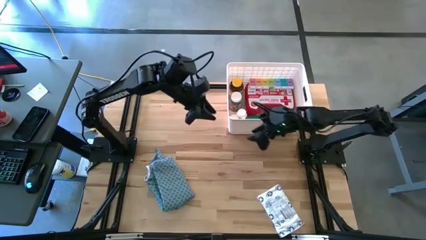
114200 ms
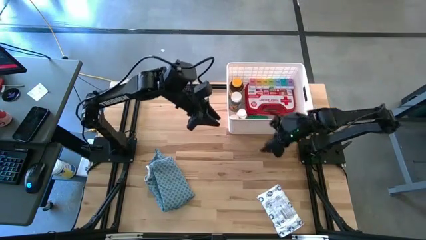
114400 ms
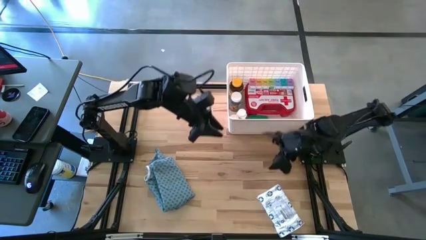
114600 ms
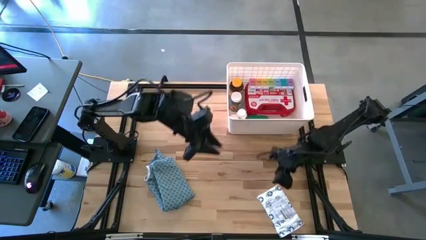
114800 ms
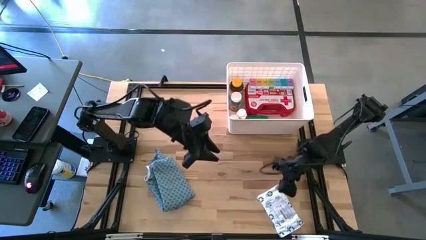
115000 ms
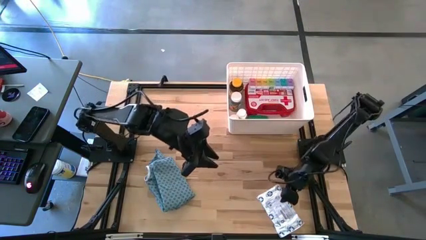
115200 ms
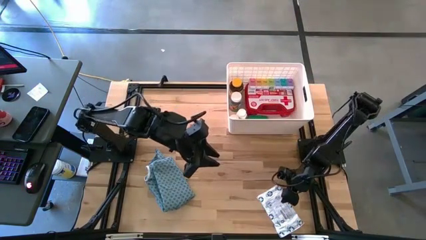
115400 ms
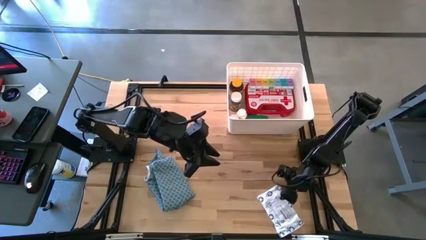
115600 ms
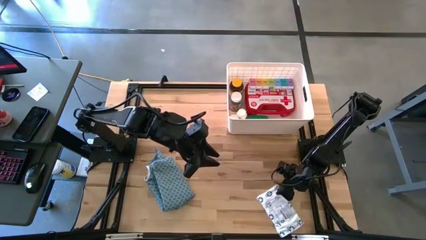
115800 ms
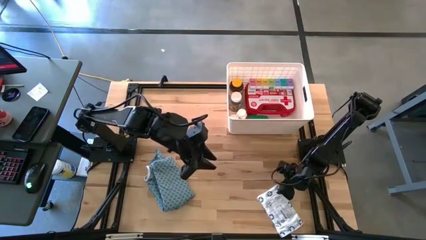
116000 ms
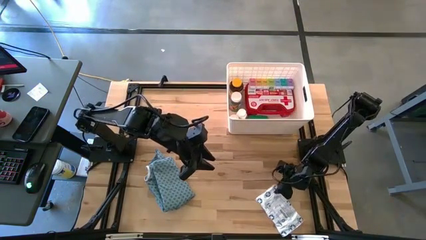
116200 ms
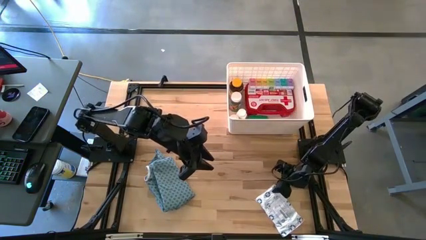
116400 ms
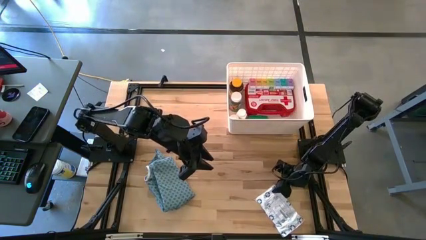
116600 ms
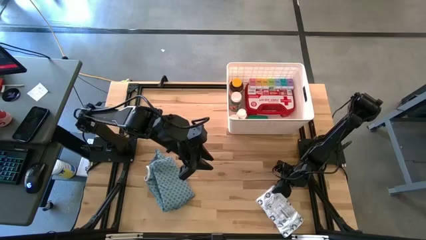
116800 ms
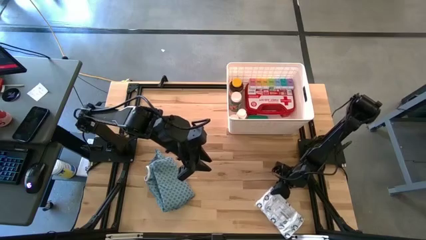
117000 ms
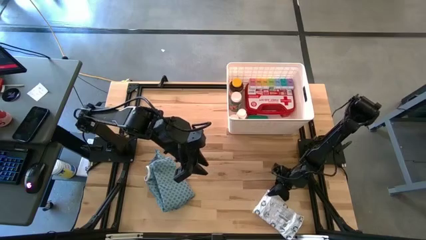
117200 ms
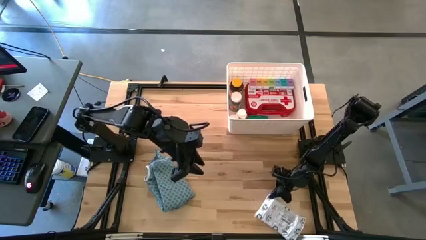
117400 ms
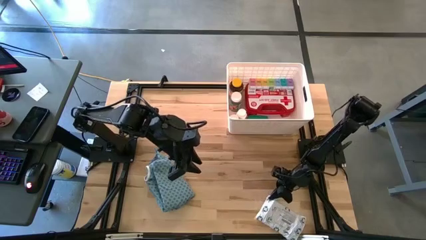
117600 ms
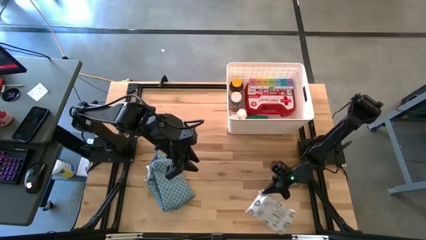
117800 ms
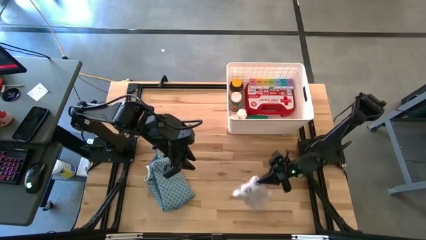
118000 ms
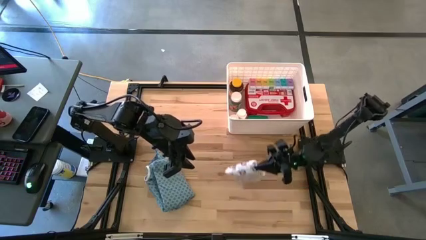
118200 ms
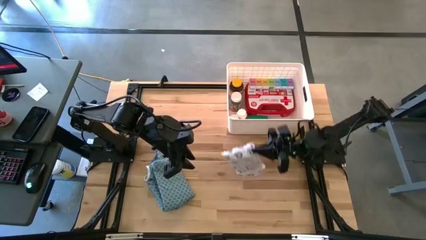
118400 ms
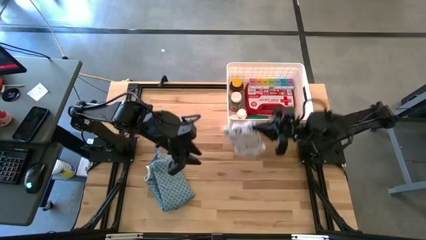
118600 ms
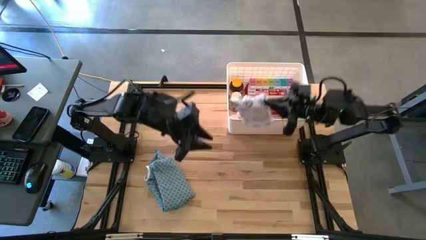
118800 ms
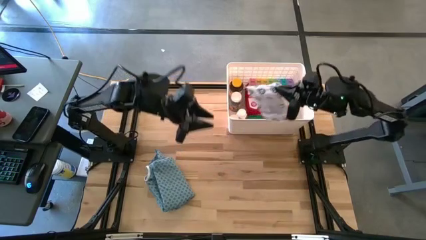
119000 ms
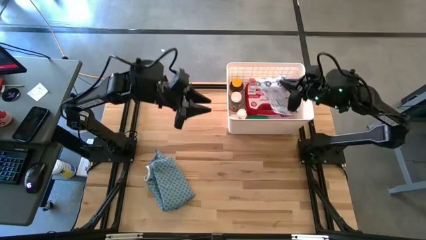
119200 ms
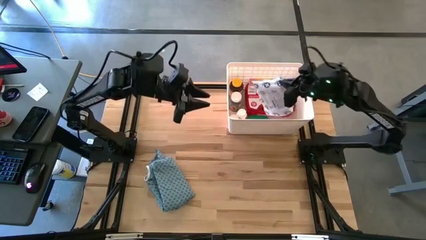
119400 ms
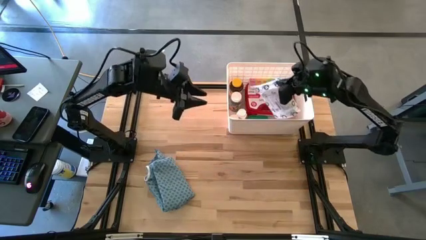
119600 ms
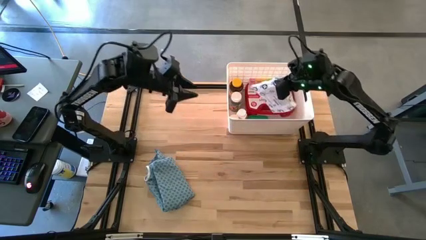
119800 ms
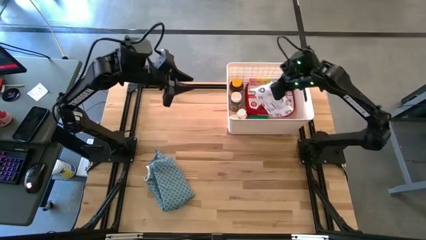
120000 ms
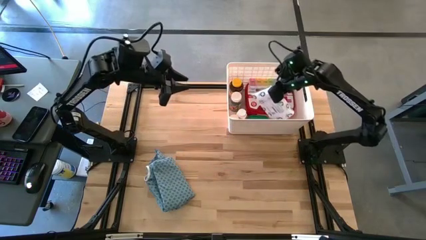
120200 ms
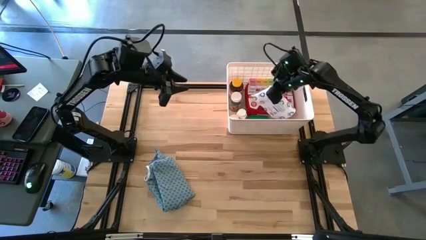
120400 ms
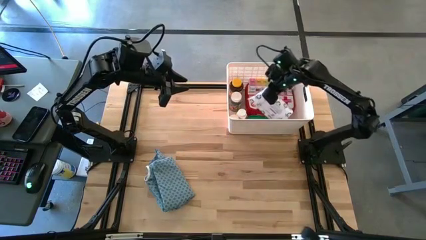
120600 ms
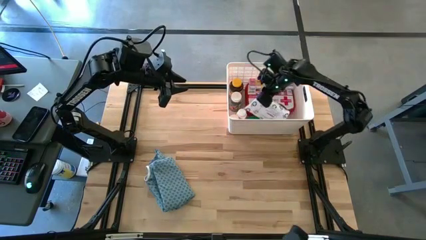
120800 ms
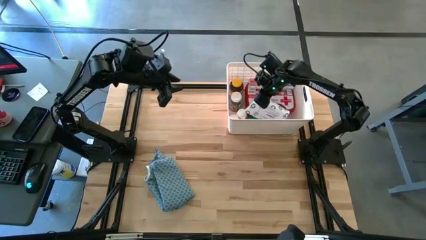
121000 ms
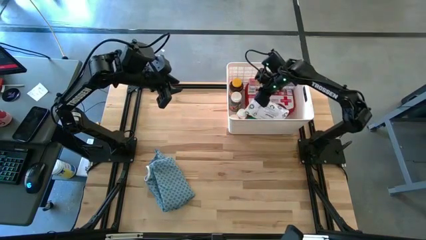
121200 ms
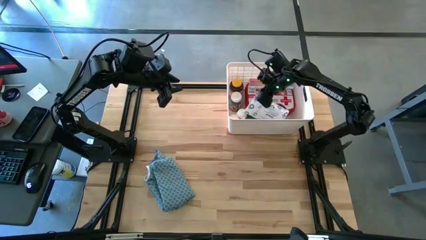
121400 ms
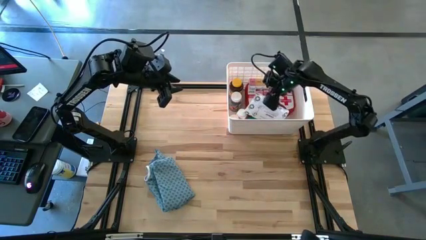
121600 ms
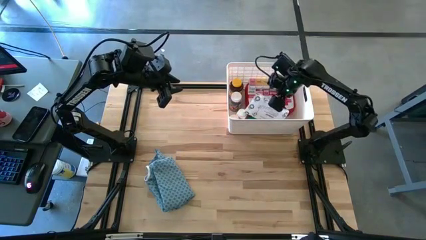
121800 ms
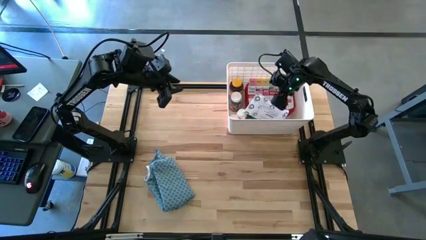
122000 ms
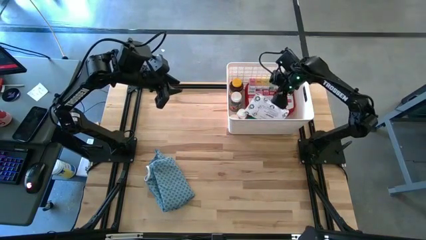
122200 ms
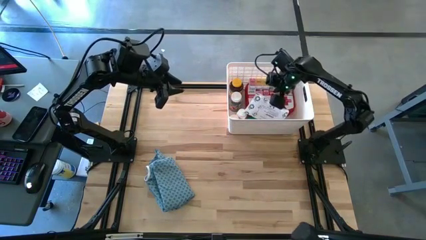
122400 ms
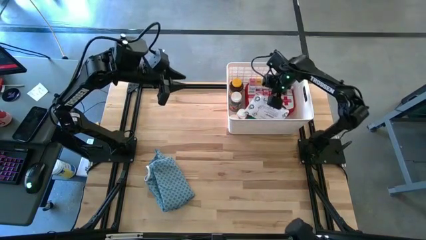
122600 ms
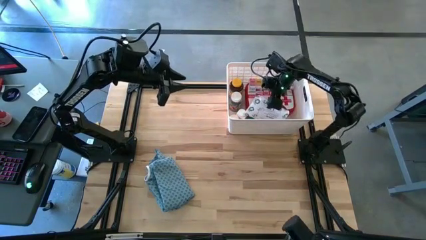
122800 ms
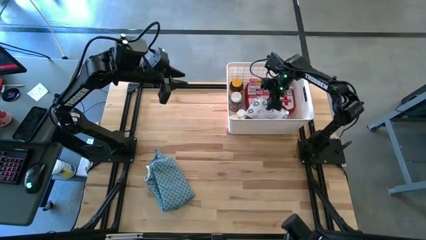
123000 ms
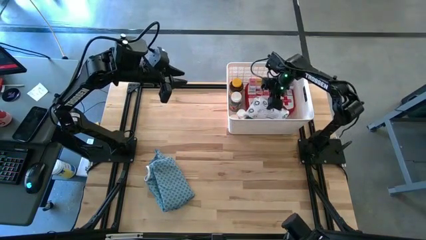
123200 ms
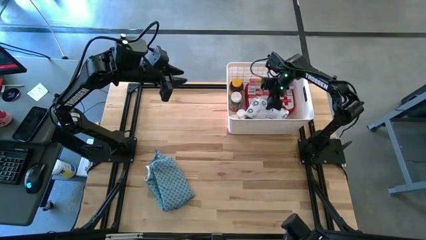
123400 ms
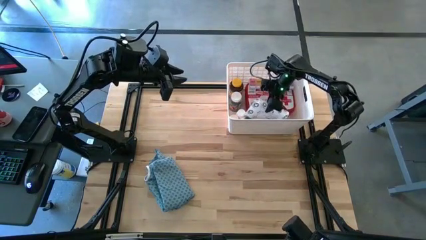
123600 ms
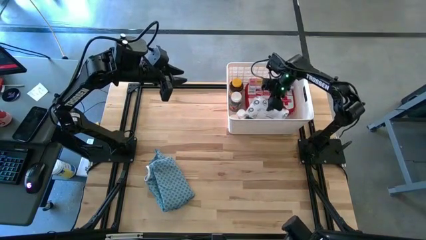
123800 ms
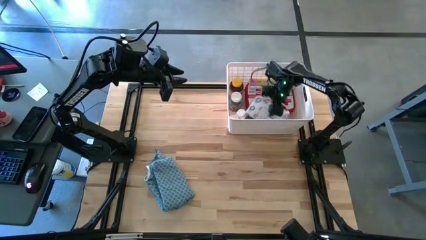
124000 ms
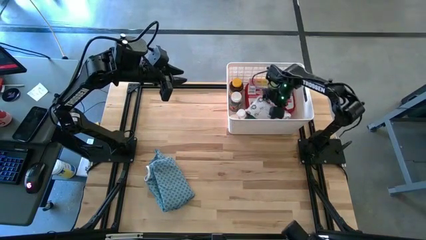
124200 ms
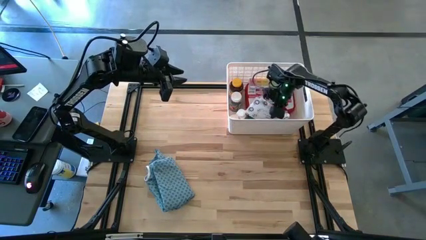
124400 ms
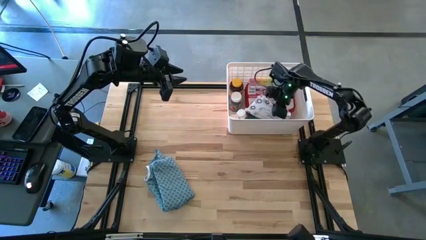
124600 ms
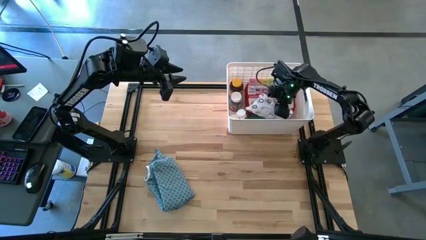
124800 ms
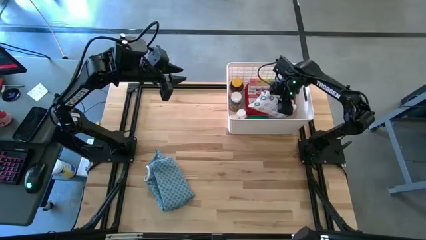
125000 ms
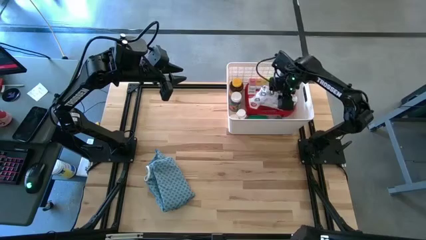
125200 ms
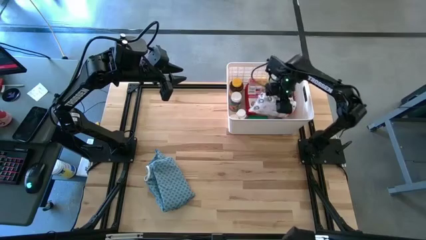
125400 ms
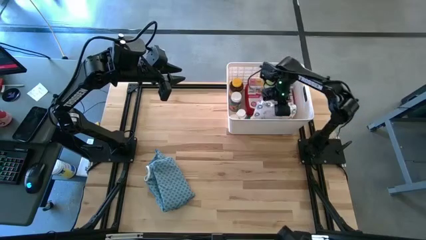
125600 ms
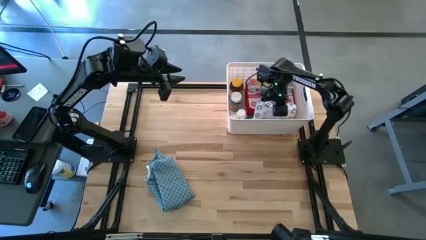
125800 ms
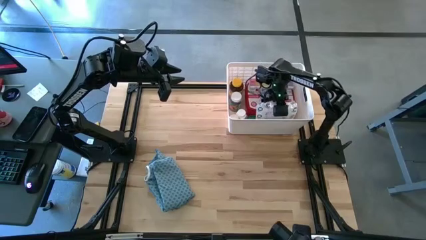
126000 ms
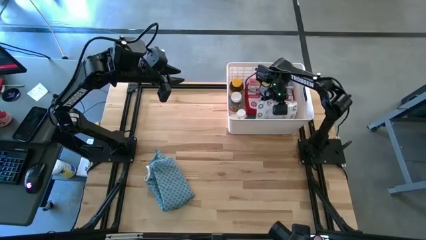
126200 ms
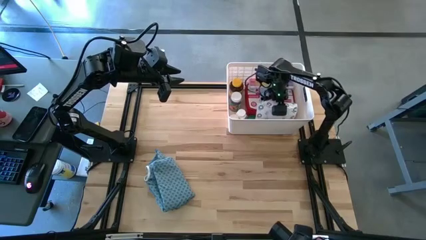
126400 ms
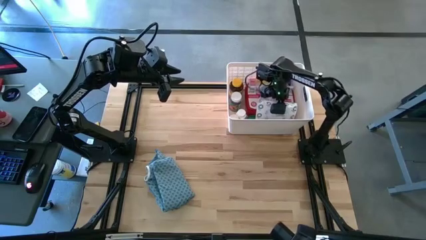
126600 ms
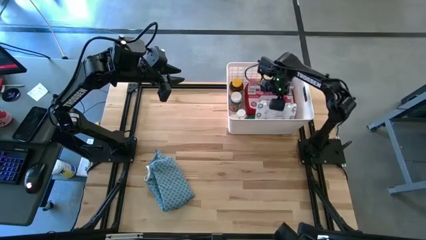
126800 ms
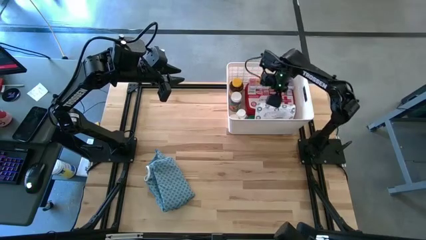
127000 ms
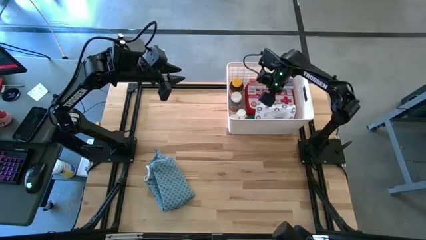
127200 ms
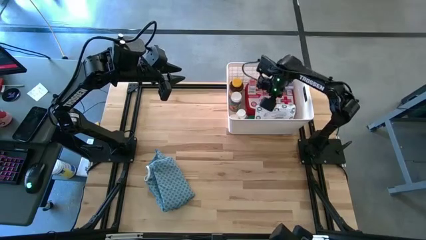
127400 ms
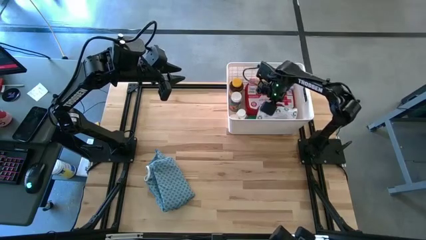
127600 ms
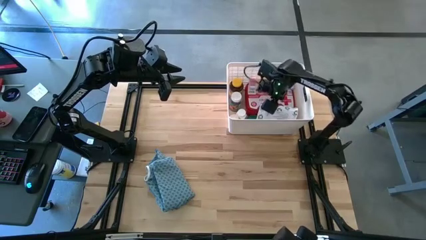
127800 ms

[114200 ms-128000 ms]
Task: Pick & place medical supplies in basket/bin
Put the white mailer bag into the white bin
